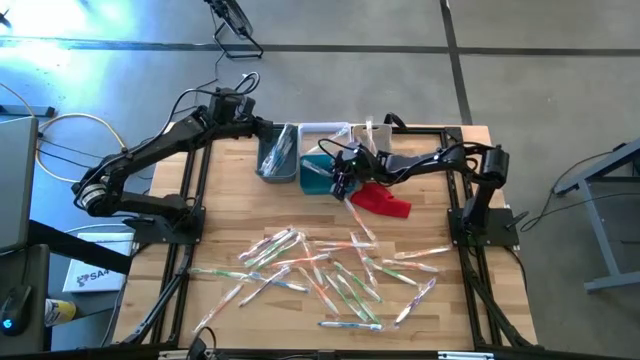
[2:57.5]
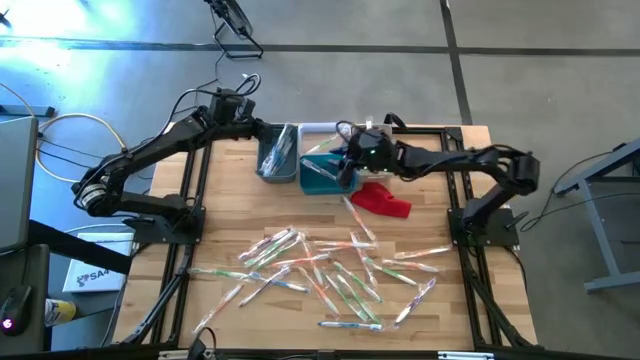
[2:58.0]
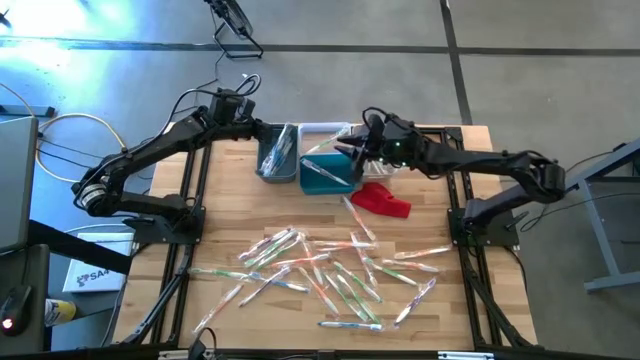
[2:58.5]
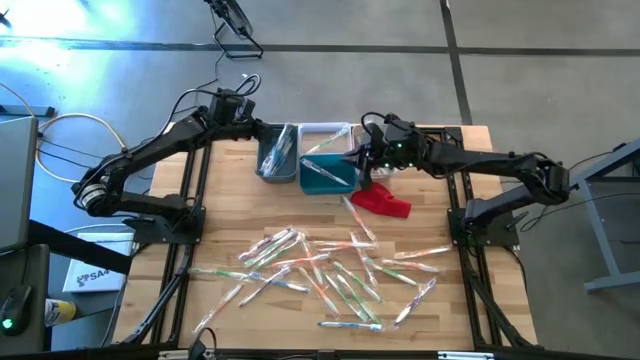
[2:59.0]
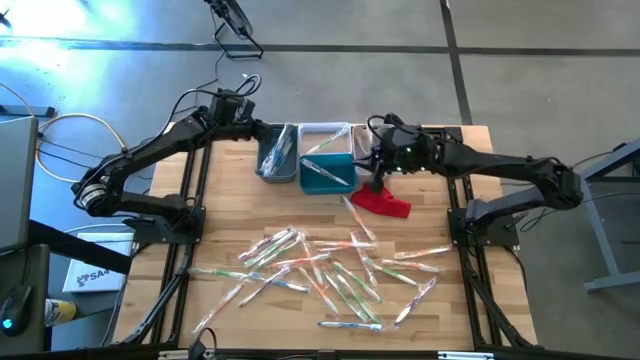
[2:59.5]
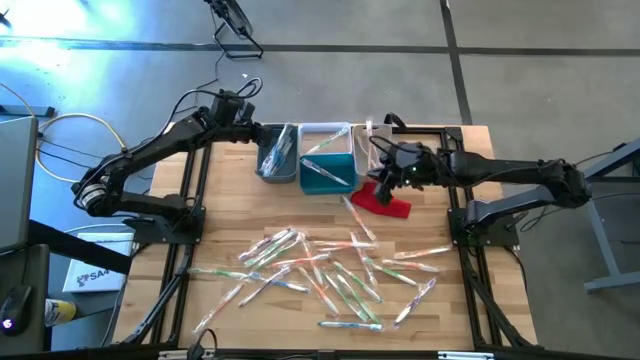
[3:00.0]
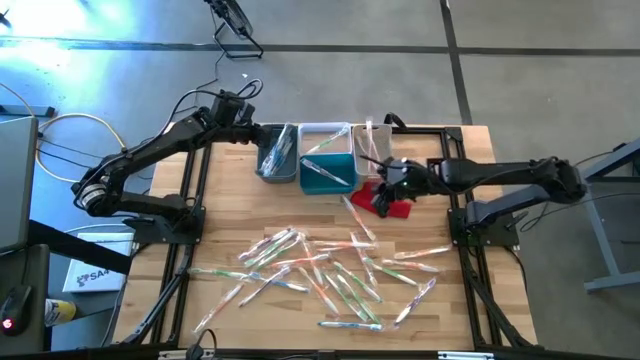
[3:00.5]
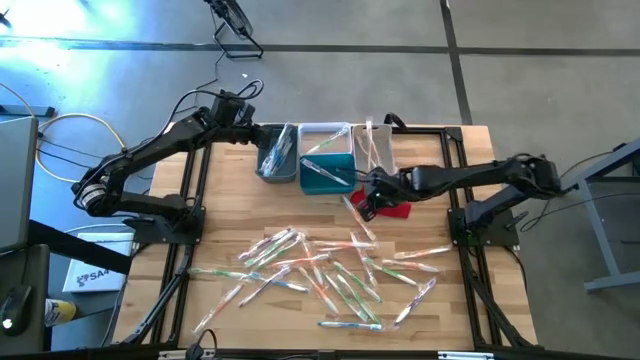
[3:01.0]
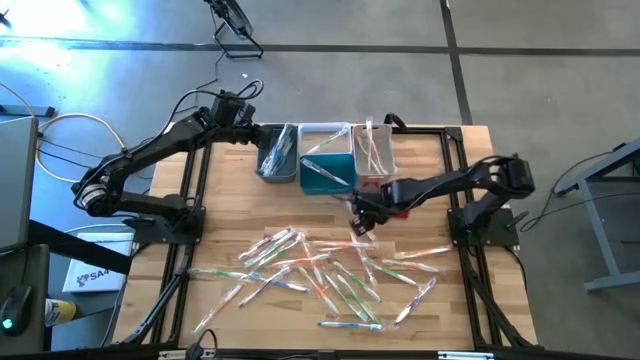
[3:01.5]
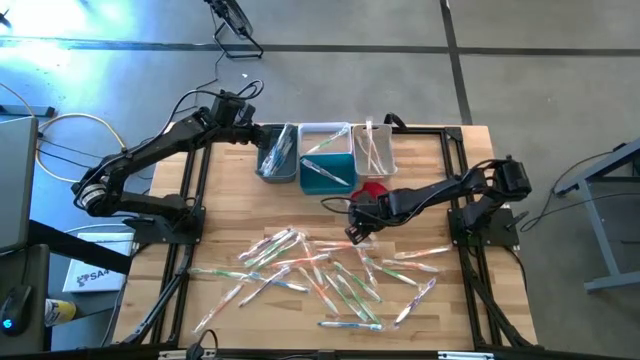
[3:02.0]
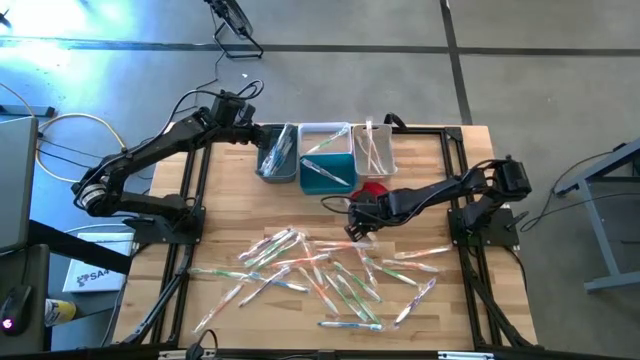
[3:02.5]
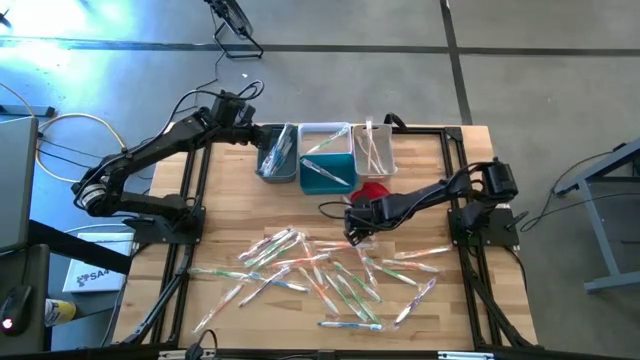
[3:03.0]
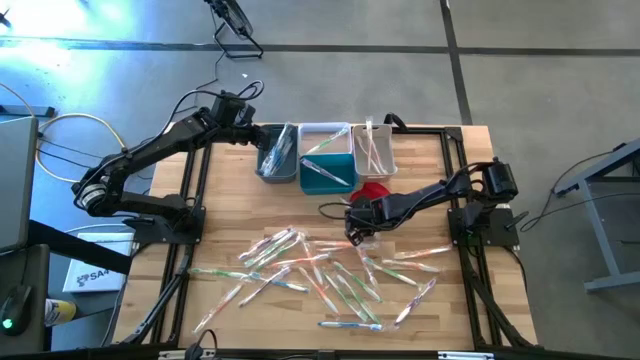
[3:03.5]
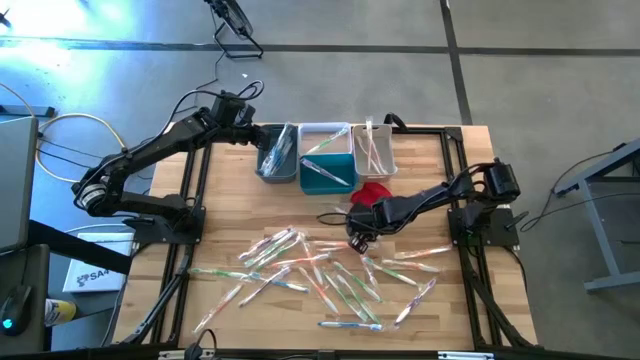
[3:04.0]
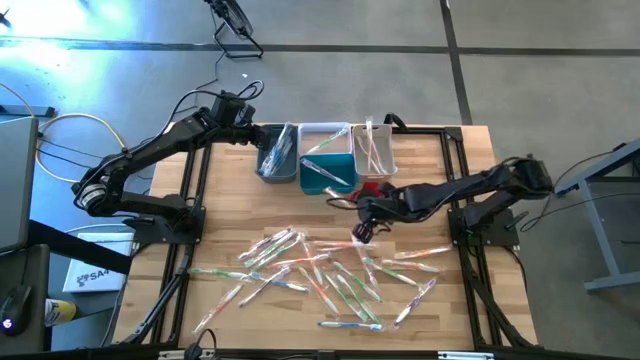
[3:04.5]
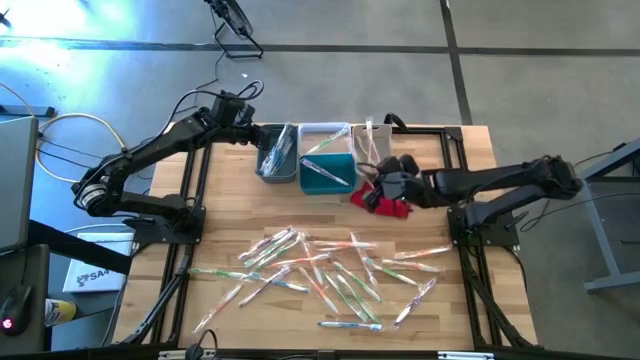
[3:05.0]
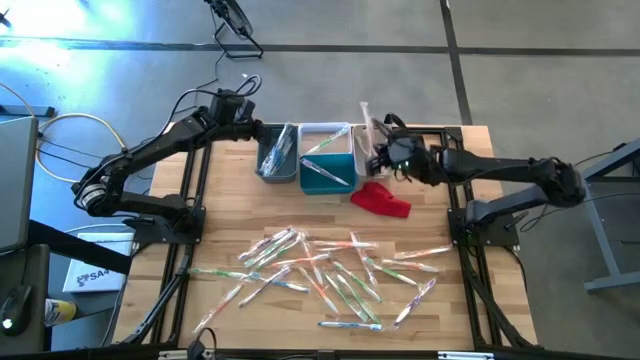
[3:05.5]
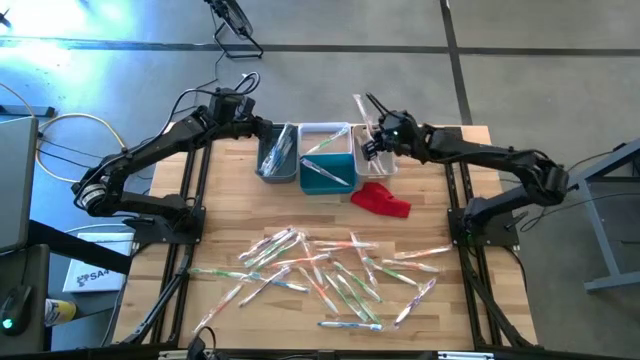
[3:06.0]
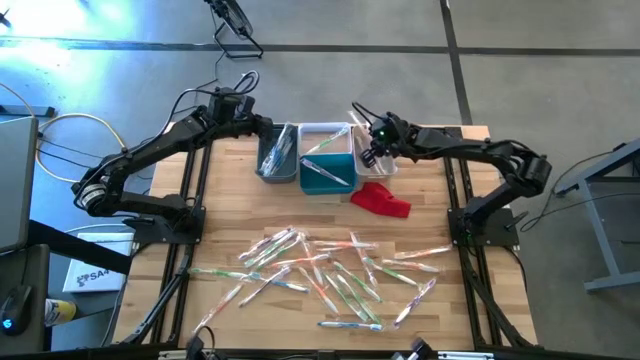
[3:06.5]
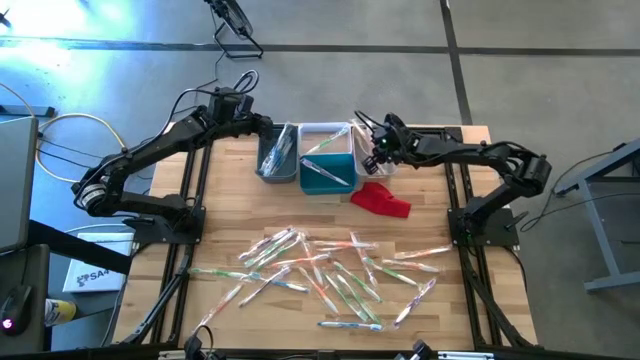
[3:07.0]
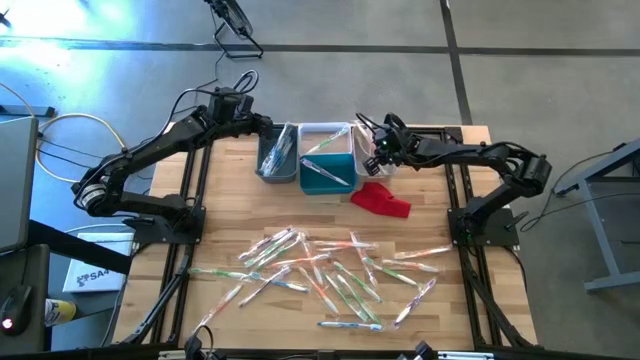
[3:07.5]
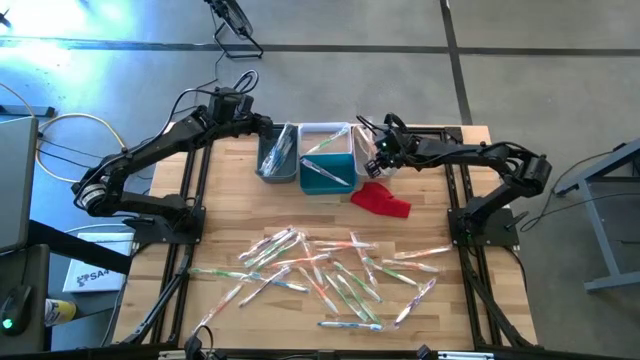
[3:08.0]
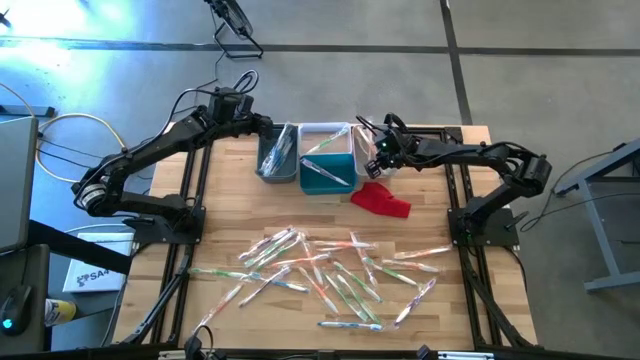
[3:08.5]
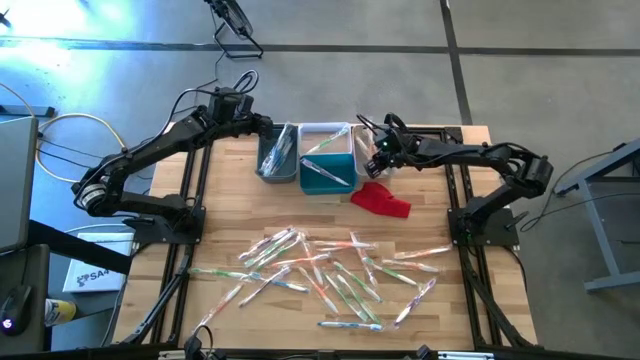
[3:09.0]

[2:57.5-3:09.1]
Task: Pick & Place Toothbrushes
Put the orange toothbrush into the white bin

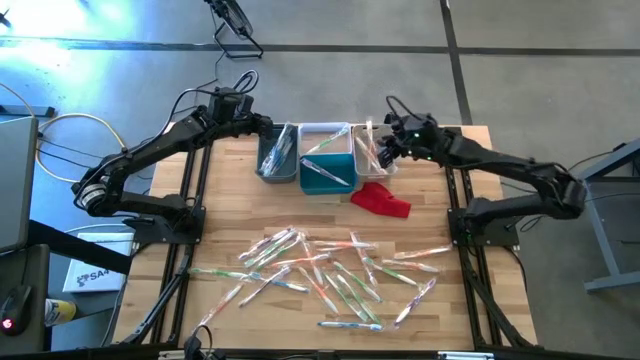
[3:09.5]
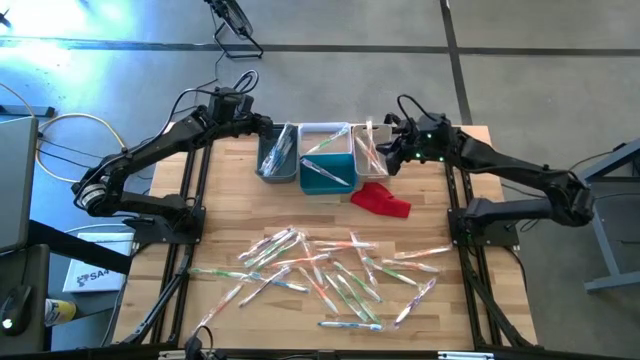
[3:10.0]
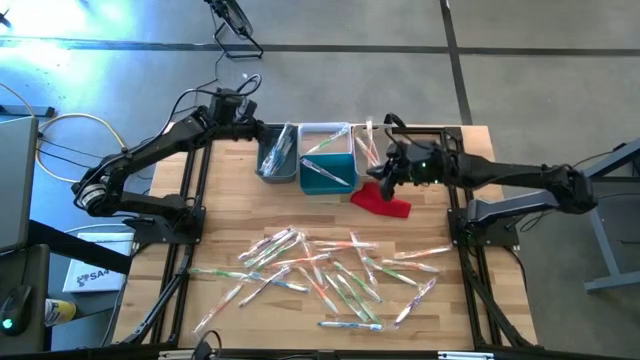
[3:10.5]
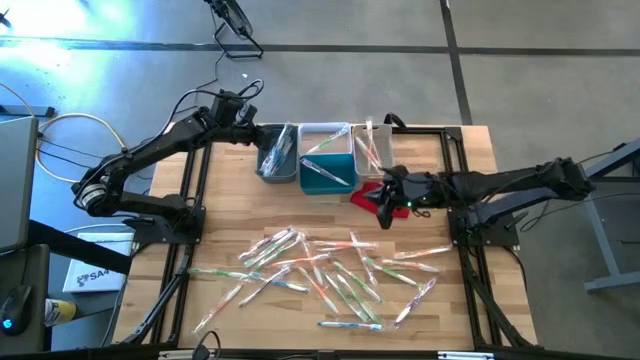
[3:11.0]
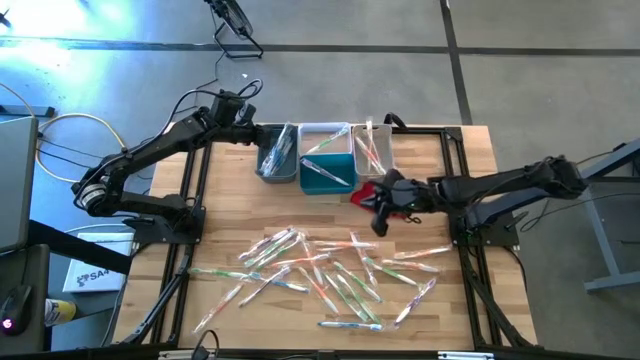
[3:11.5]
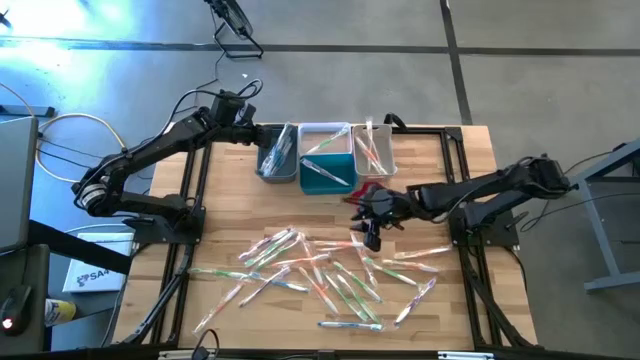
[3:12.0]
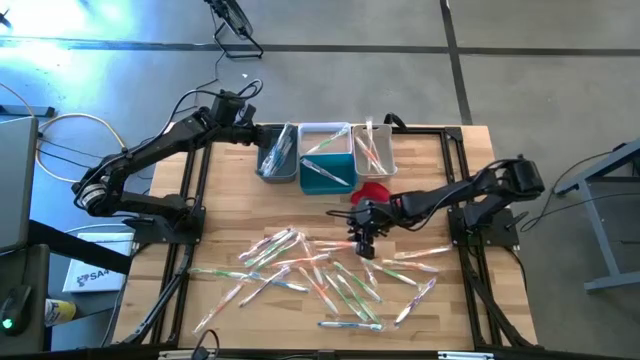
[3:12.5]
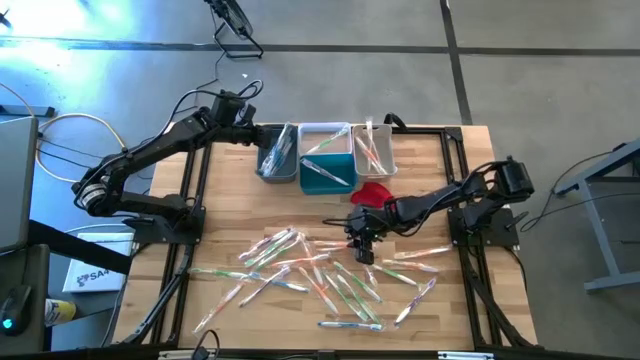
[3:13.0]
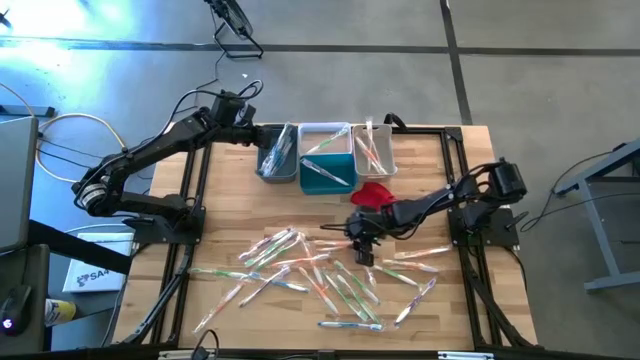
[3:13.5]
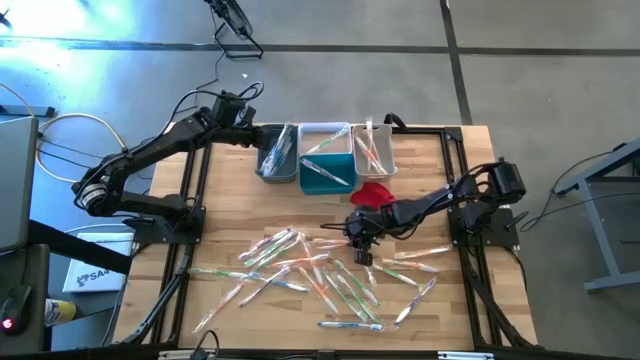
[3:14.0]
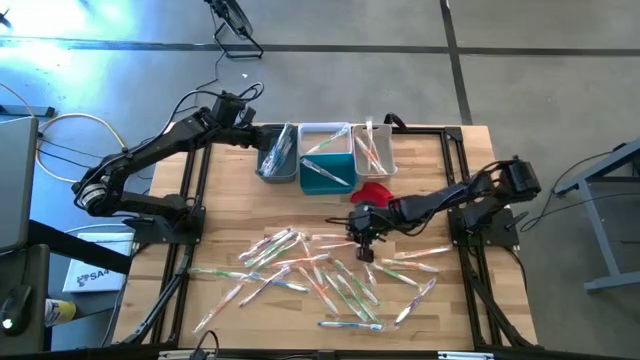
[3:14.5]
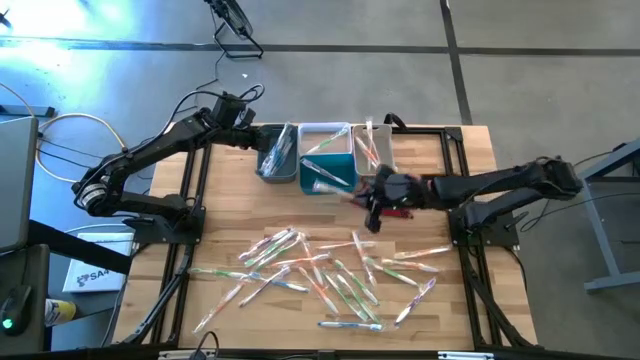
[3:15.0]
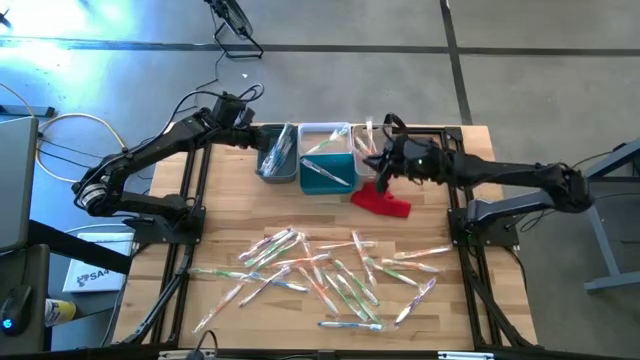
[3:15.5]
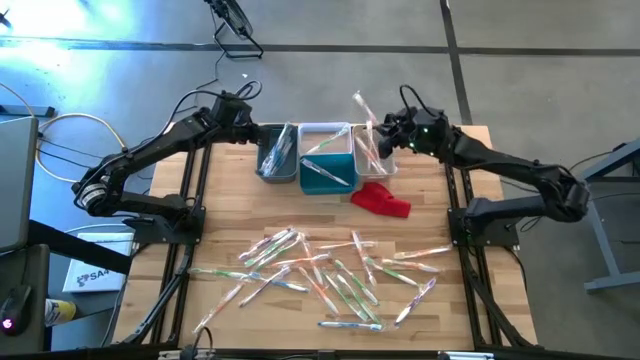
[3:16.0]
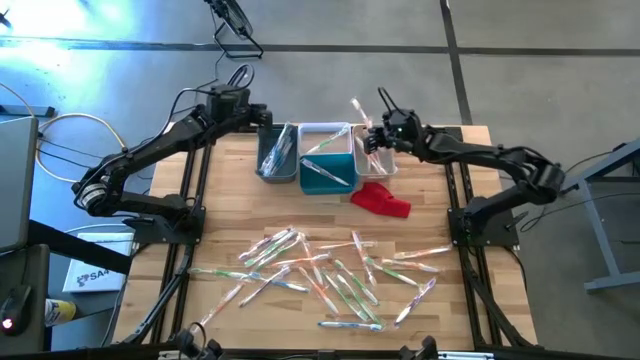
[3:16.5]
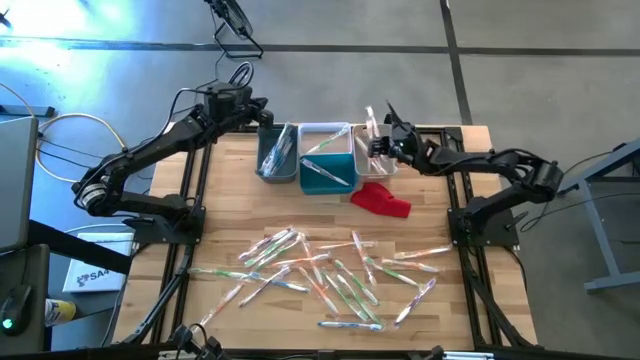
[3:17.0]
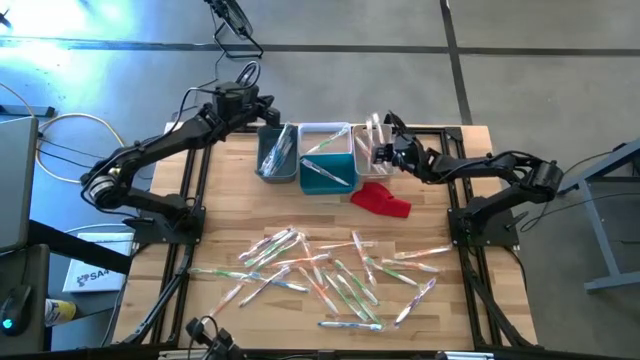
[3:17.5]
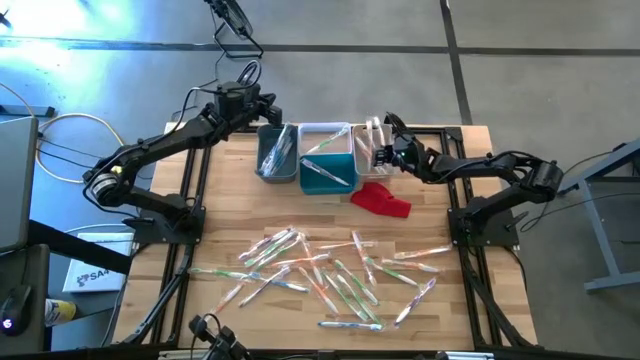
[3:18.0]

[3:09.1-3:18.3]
Put the orange toothbrush into the white bin
